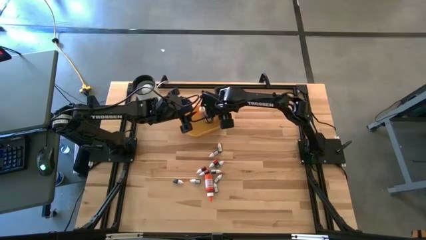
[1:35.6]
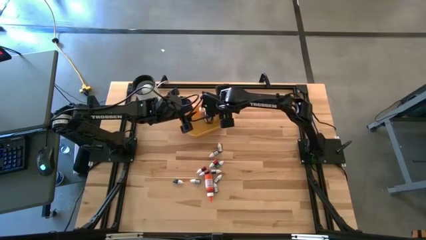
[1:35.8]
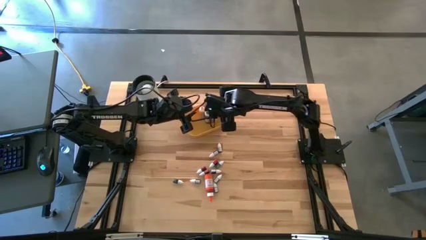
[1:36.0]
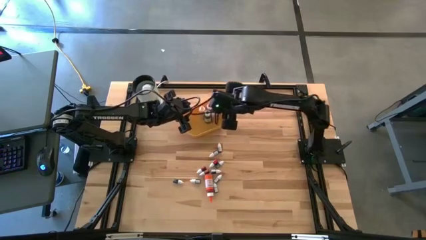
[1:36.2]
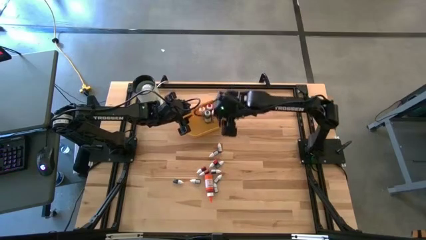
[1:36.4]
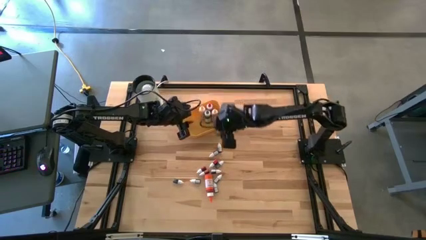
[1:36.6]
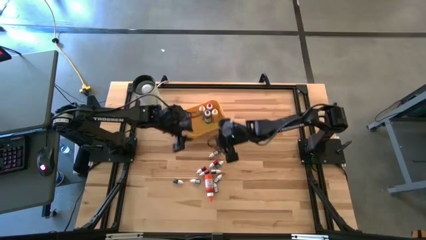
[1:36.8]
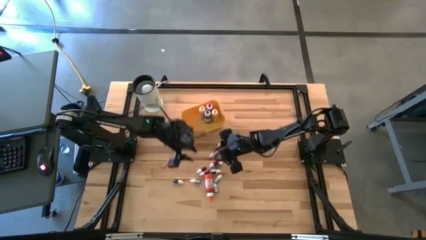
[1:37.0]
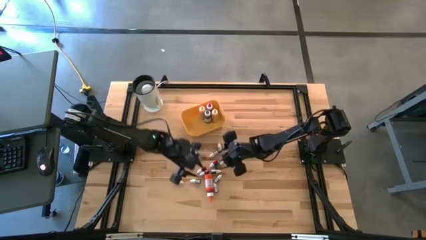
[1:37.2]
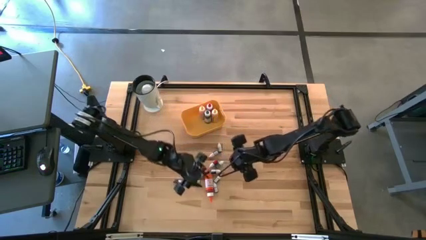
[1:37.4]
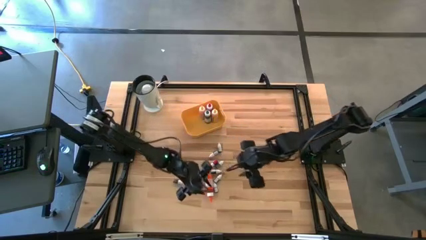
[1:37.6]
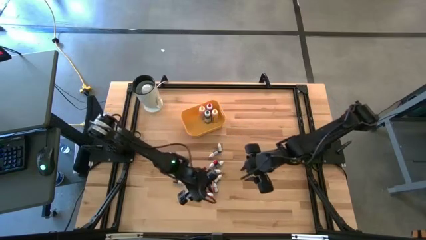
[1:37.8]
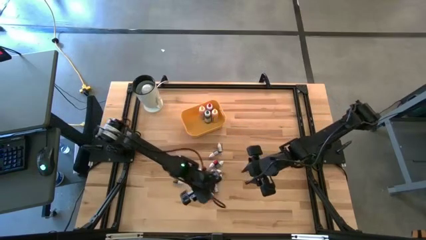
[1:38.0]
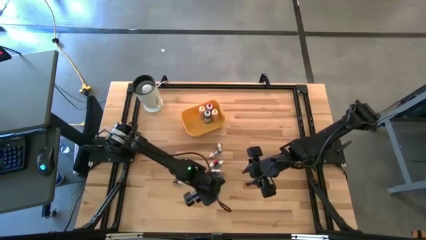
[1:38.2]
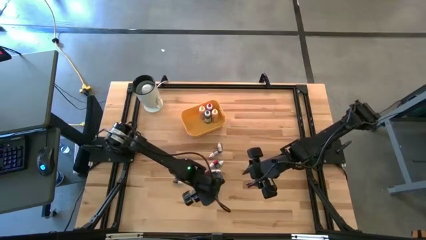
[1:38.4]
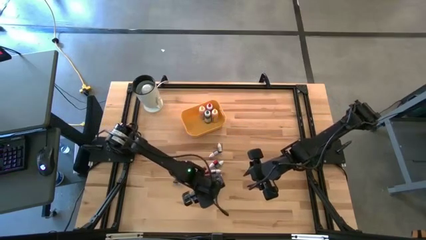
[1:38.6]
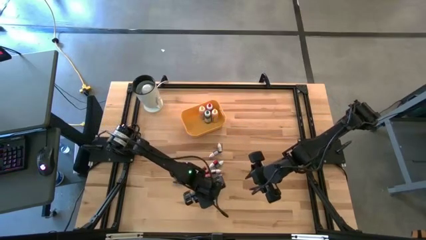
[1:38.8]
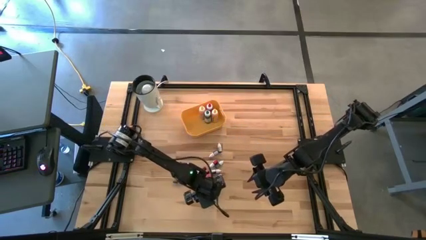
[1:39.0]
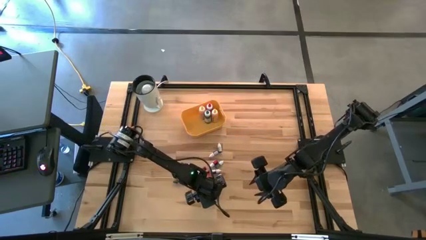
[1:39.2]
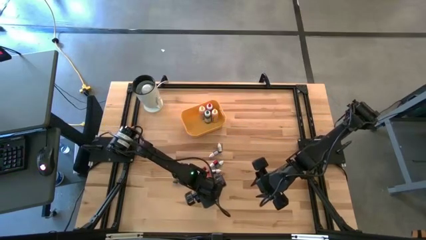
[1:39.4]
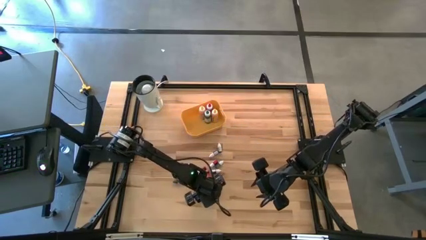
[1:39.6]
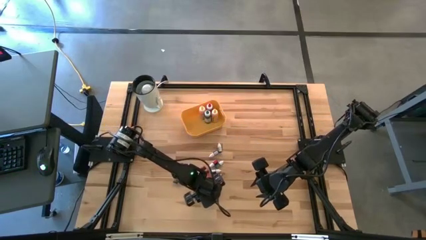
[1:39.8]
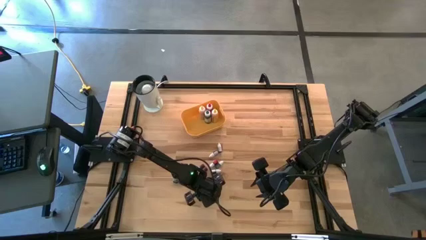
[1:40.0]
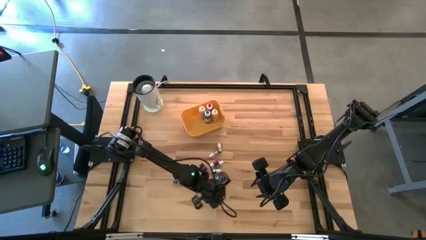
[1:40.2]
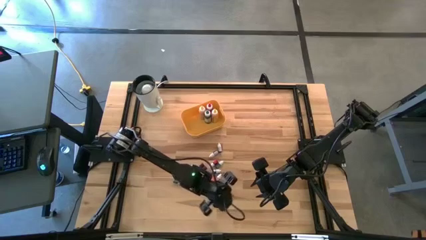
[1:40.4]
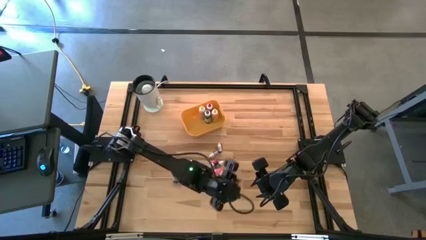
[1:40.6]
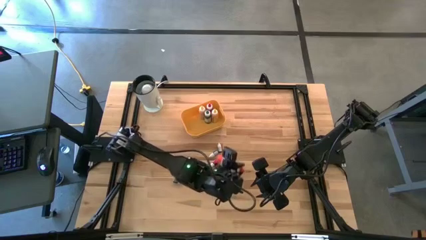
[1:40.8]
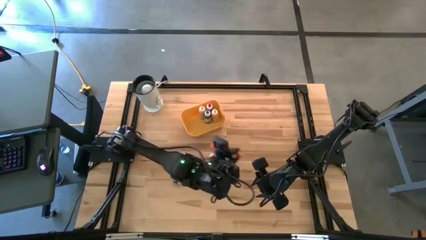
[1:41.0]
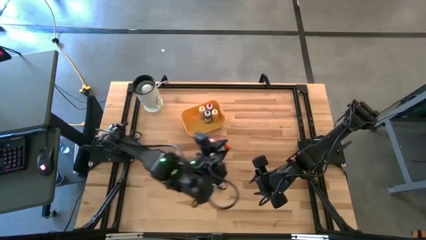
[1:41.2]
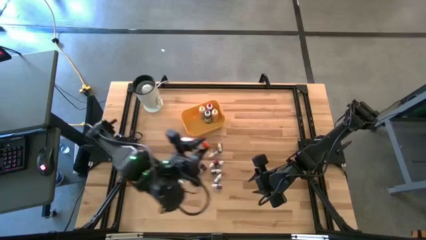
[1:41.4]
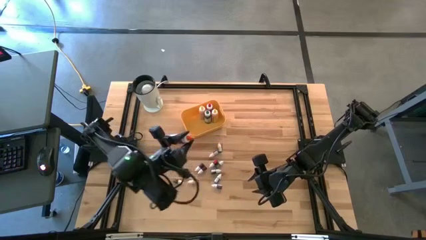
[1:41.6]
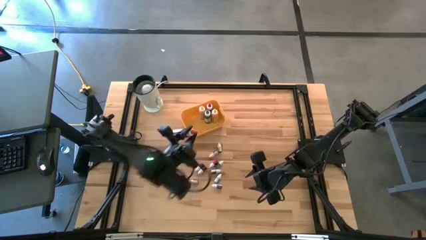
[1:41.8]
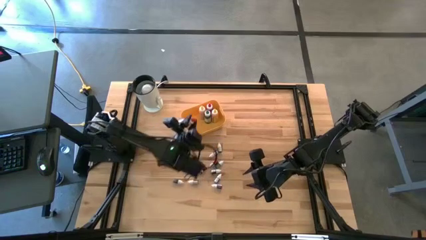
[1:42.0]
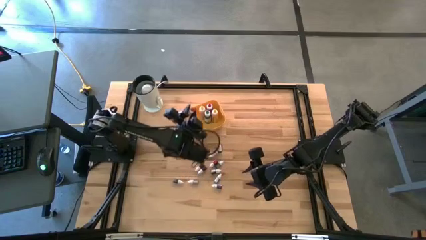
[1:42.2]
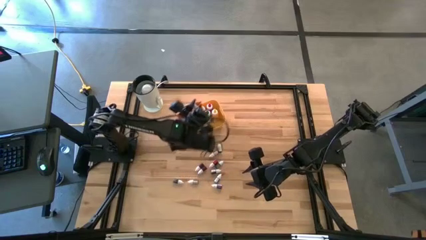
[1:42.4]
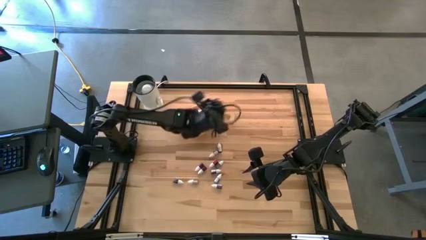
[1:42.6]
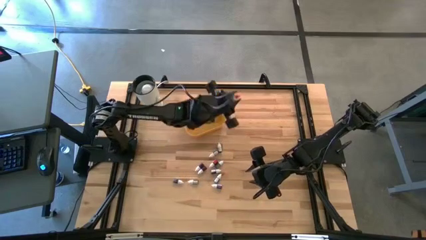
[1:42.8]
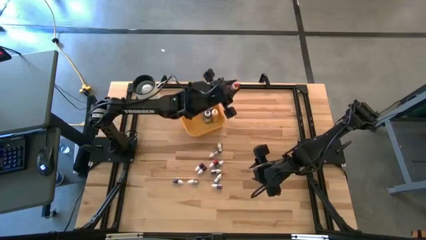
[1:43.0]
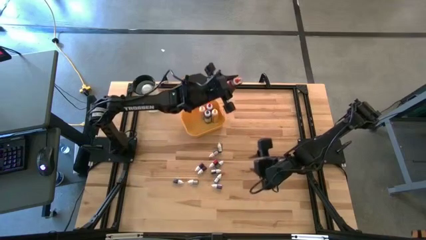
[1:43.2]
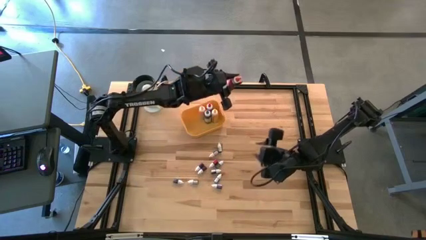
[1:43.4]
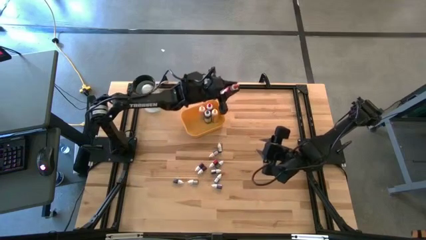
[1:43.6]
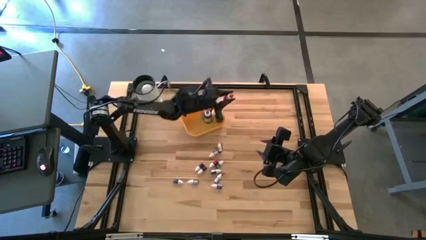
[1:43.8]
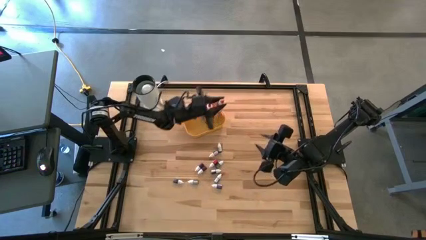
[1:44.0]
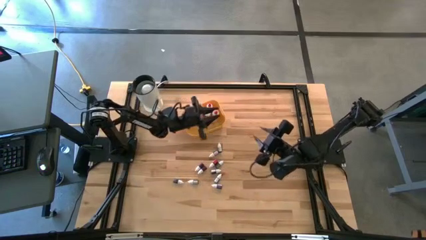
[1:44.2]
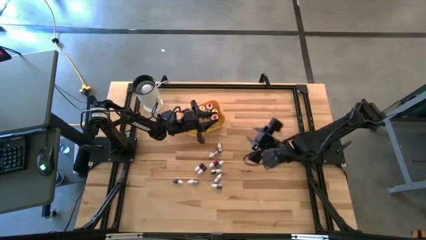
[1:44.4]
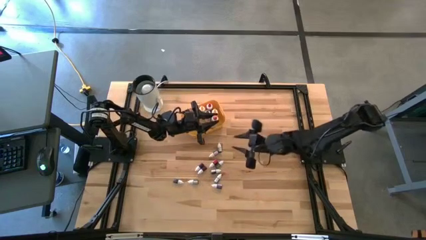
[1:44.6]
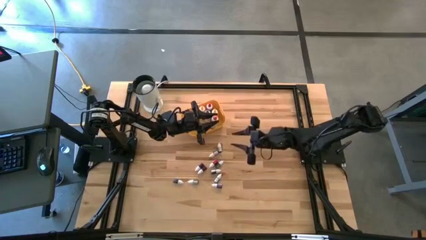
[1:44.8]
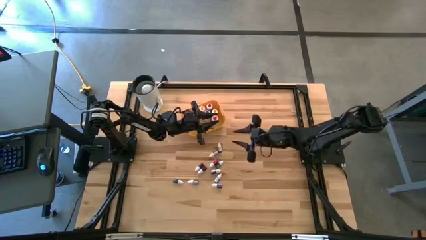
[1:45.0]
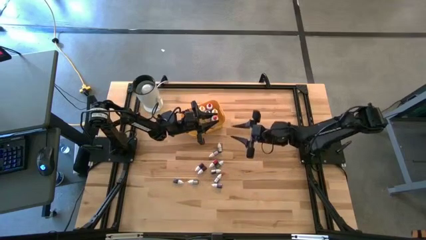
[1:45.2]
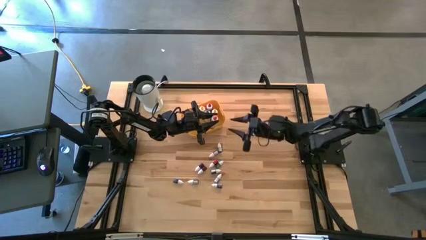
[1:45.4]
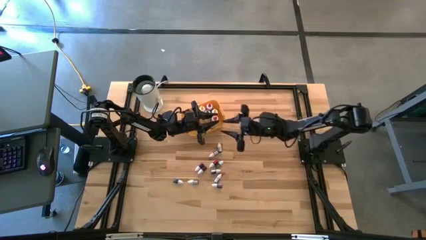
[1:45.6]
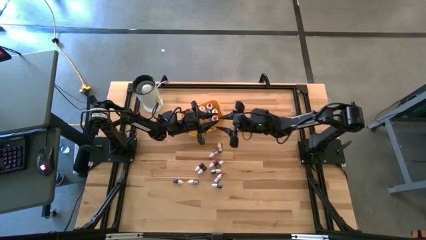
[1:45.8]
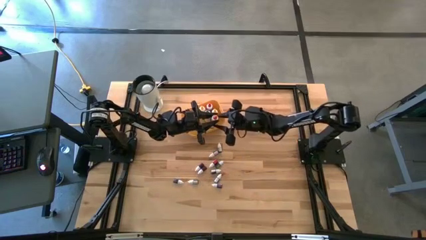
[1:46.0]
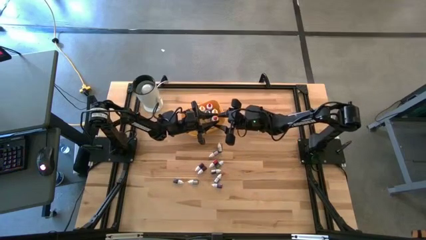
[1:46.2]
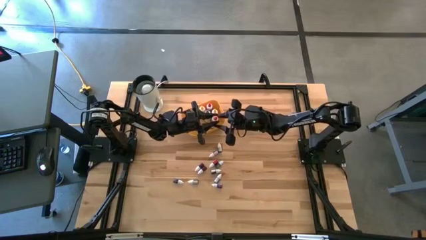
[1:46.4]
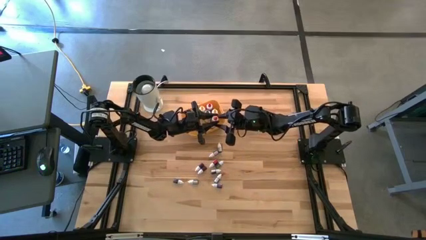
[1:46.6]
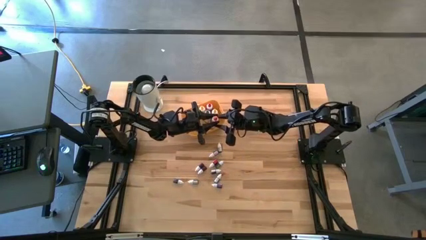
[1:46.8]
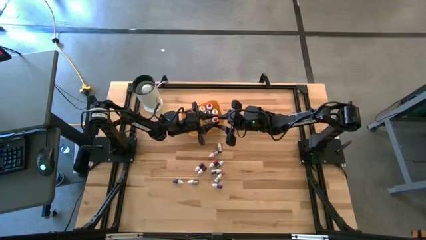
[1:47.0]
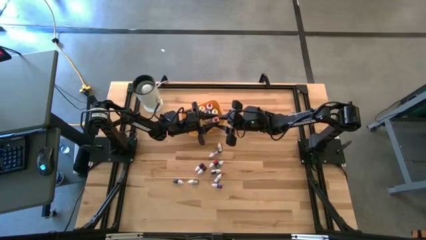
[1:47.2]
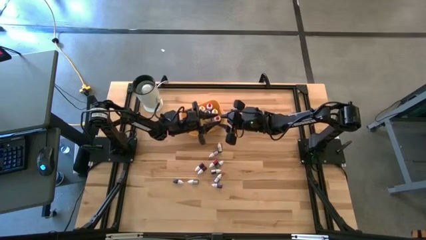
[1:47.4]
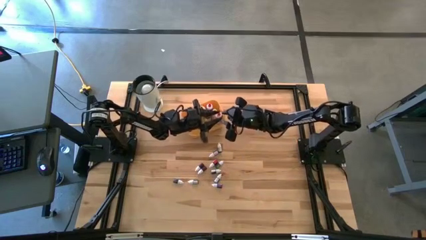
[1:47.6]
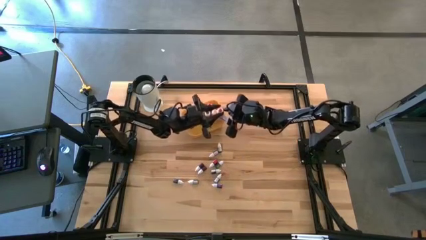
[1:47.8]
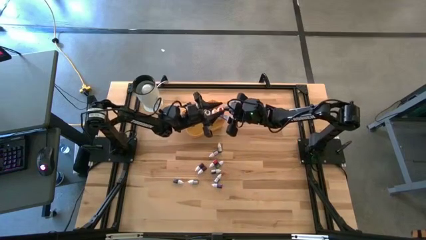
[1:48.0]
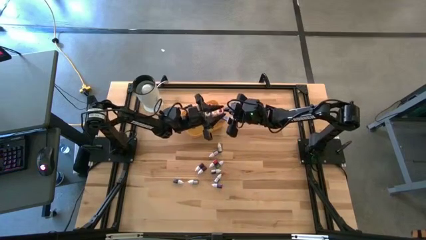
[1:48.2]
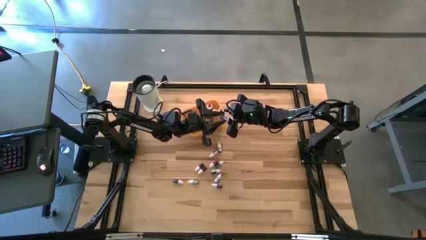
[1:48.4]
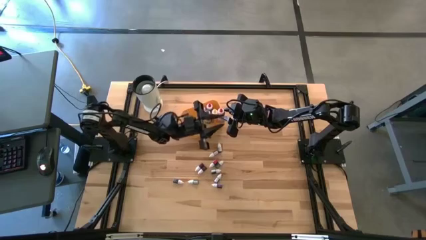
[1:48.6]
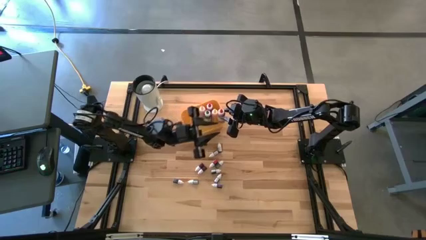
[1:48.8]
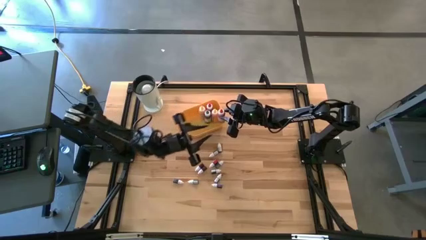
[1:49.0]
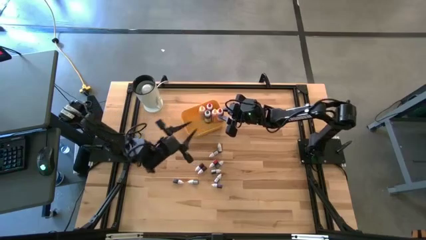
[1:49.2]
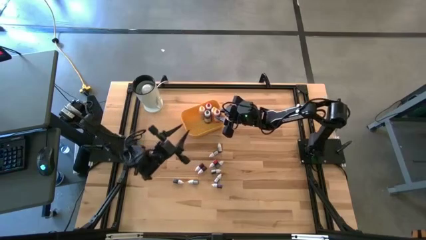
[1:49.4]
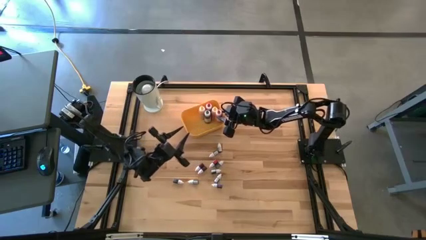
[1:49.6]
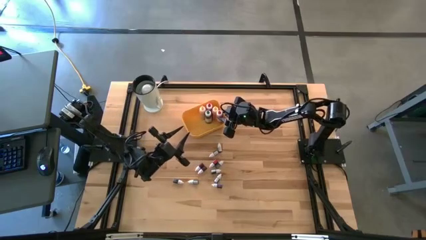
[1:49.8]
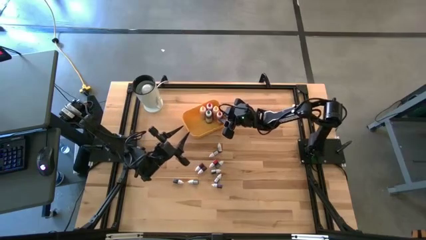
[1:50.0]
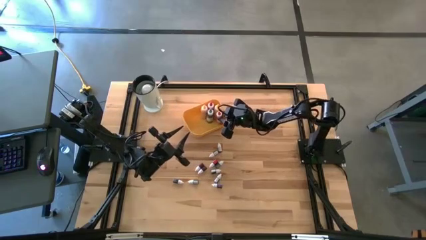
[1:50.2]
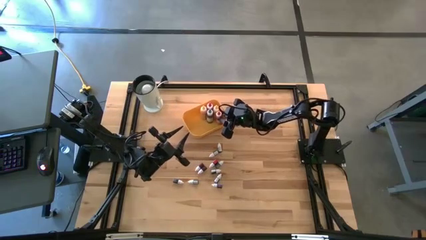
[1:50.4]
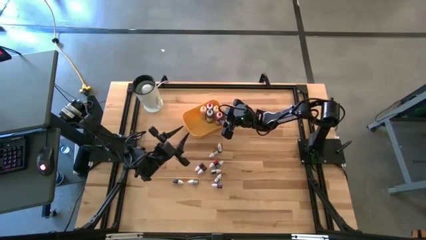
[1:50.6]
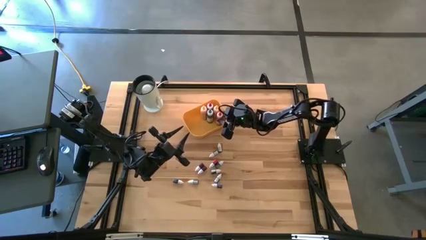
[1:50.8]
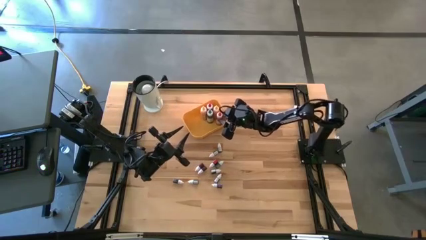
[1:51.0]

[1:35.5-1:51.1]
Task: Pick & Place food coloring
Put the large orange food coloring bottle into the yellow bin

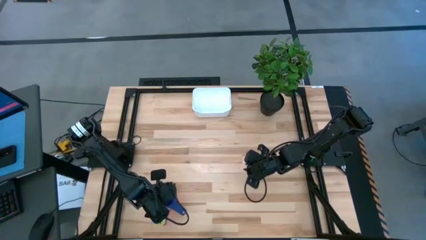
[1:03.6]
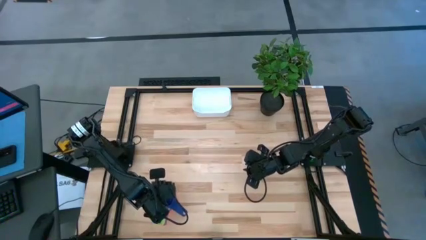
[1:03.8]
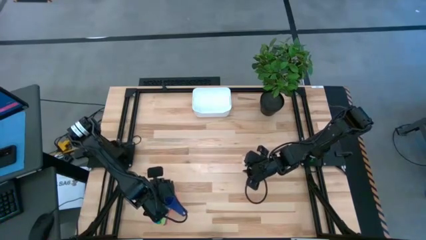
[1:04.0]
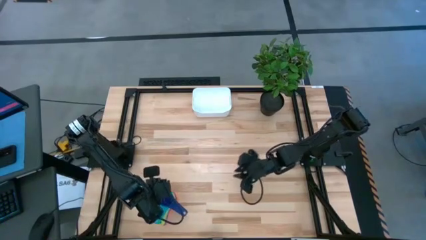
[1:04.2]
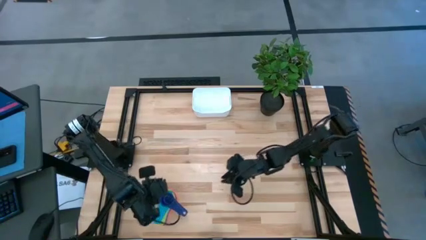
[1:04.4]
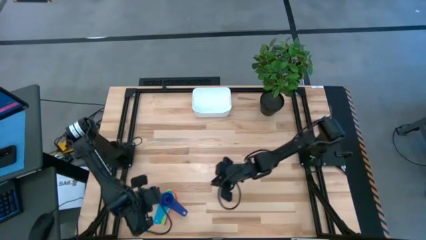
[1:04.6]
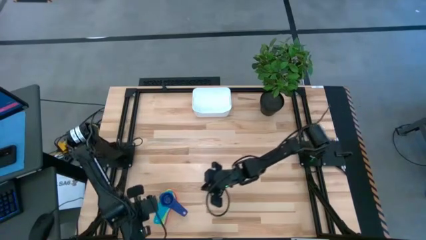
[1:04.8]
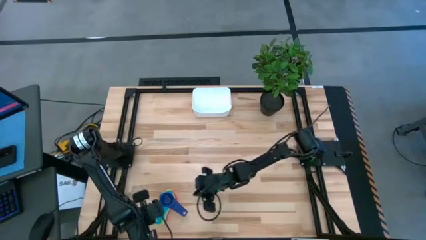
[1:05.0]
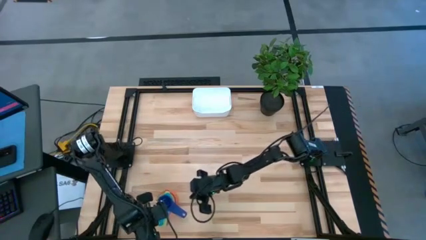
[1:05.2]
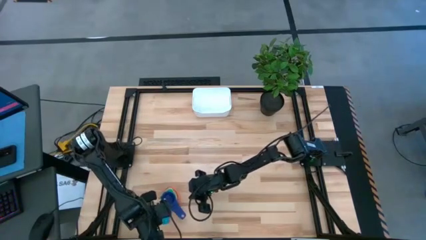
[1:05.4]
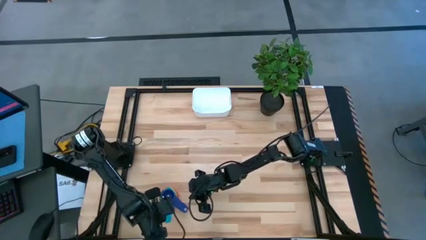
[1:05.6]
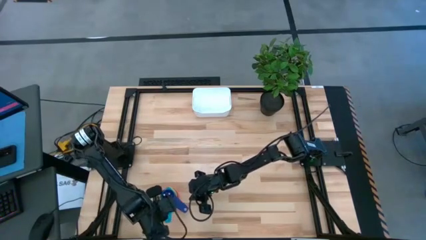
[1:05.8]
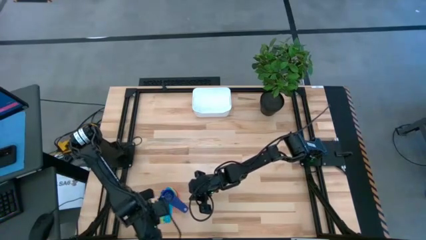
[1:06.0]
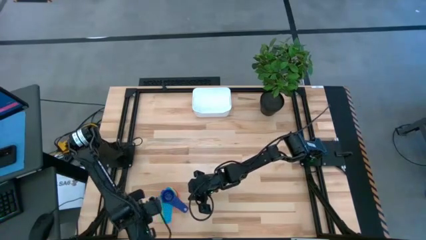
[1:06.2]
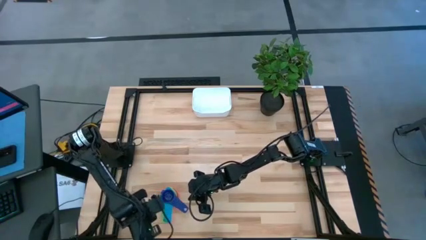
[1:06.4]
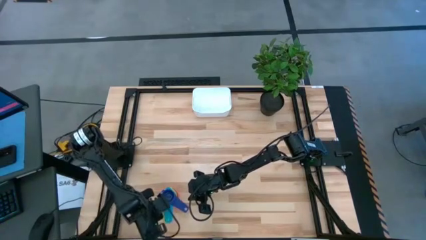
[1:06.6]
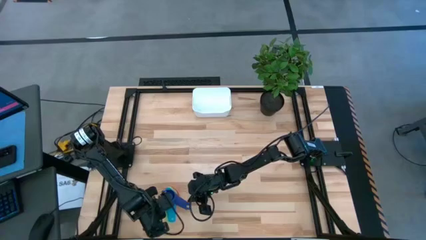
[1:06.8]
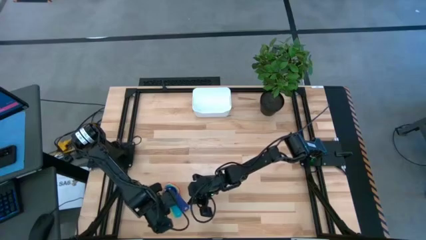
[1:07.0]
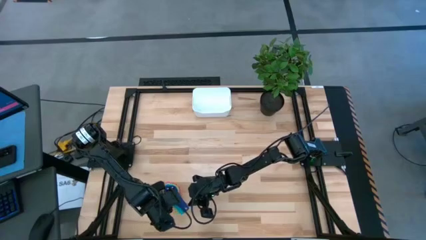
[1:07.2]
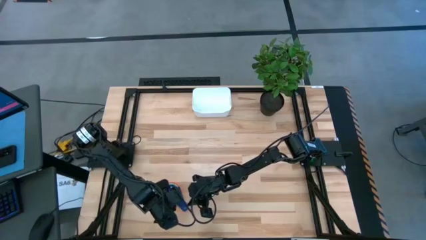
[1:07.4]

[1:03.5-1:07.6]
Task: Nest measuring cups in basket
Adjust the measuring cups
